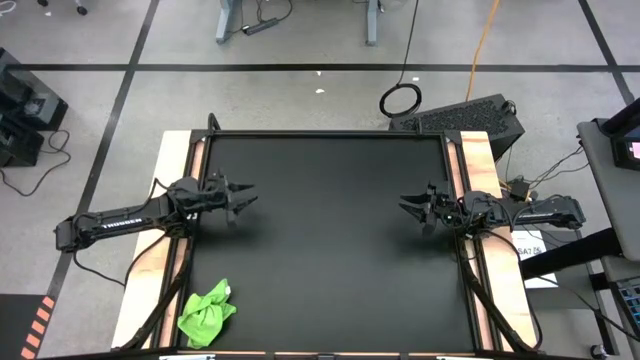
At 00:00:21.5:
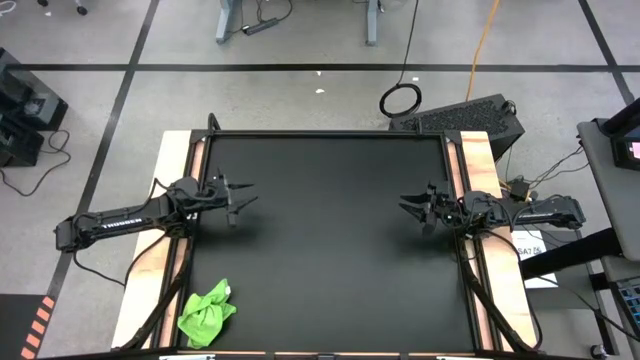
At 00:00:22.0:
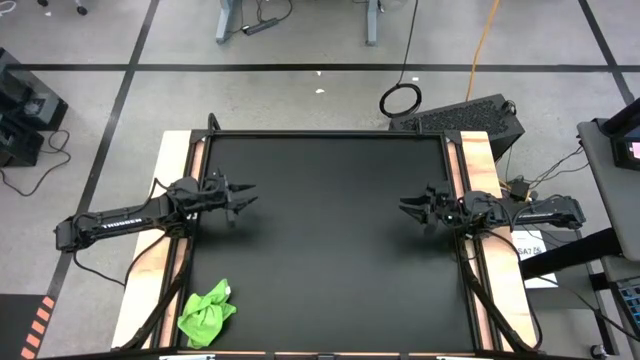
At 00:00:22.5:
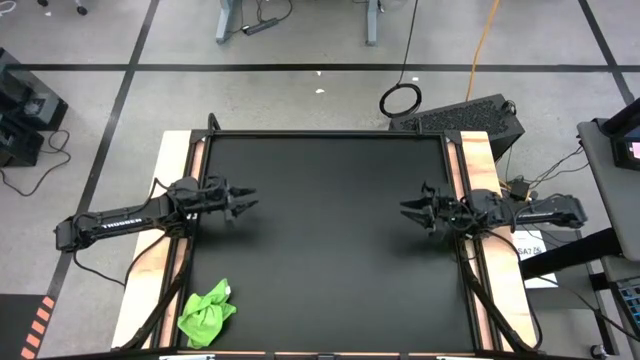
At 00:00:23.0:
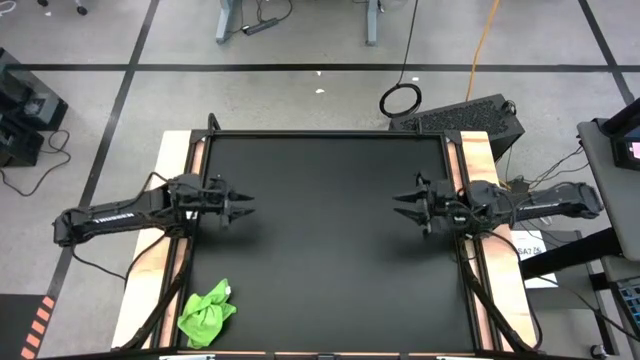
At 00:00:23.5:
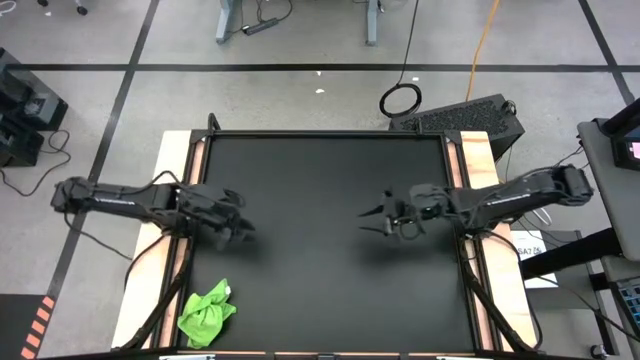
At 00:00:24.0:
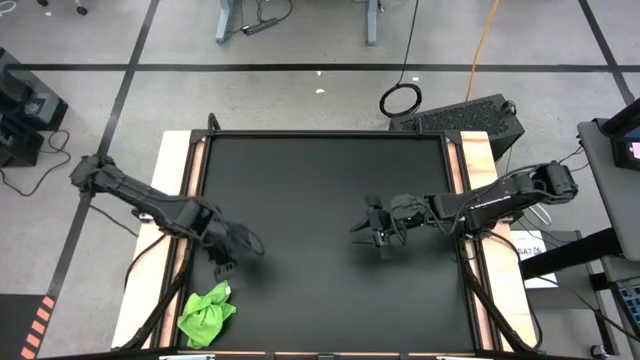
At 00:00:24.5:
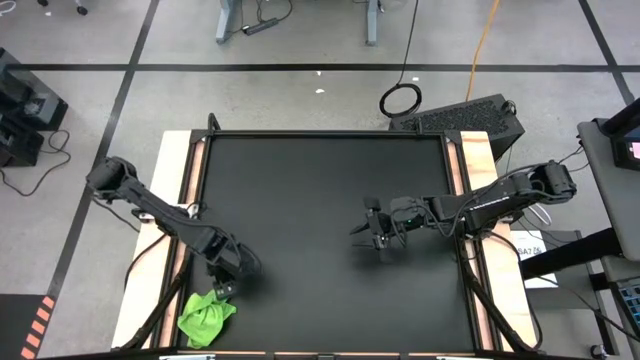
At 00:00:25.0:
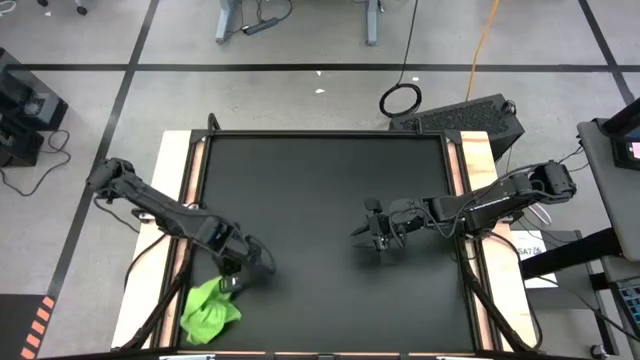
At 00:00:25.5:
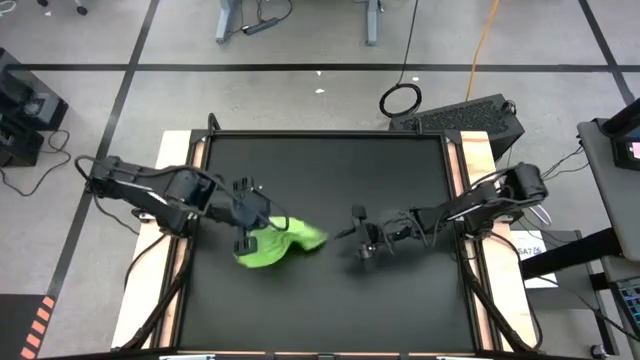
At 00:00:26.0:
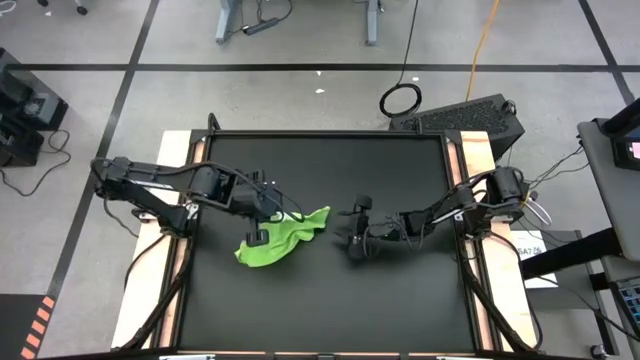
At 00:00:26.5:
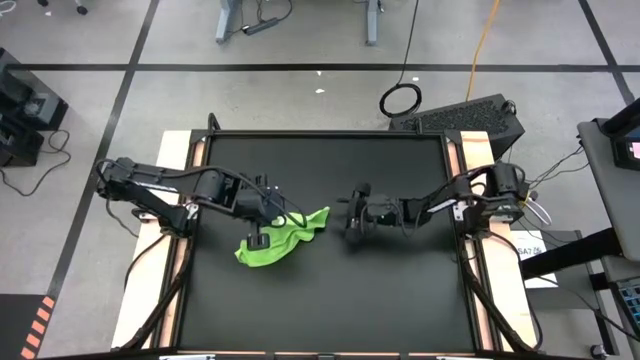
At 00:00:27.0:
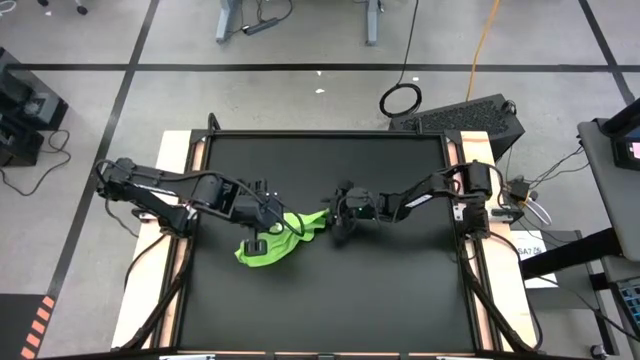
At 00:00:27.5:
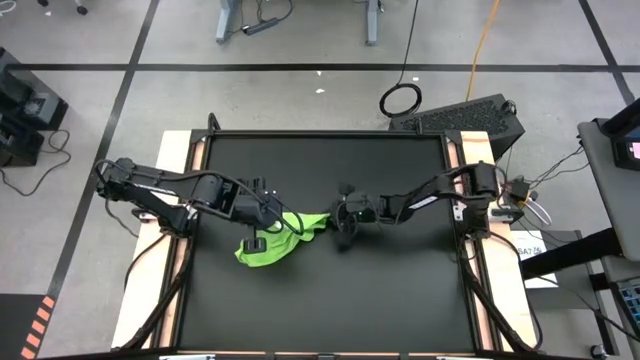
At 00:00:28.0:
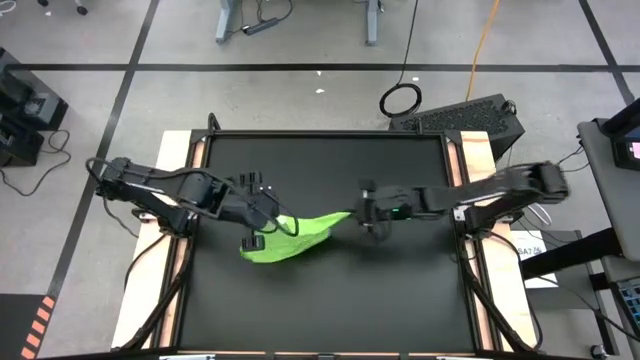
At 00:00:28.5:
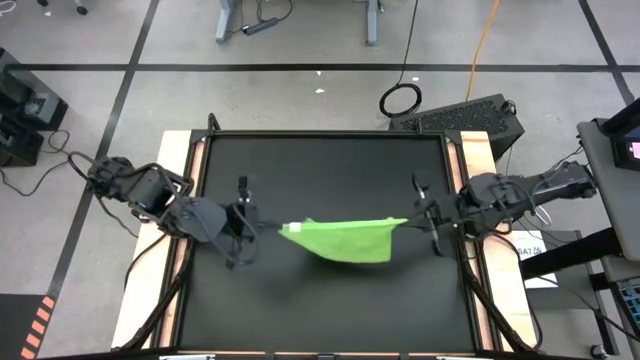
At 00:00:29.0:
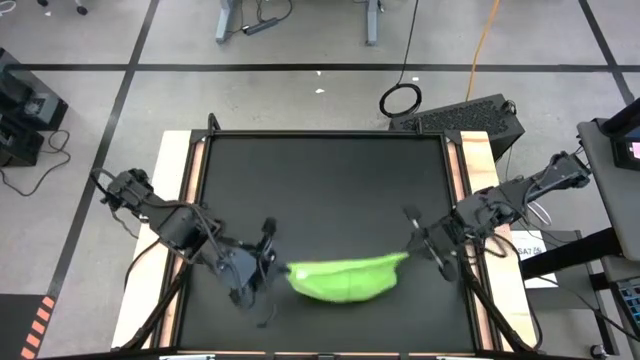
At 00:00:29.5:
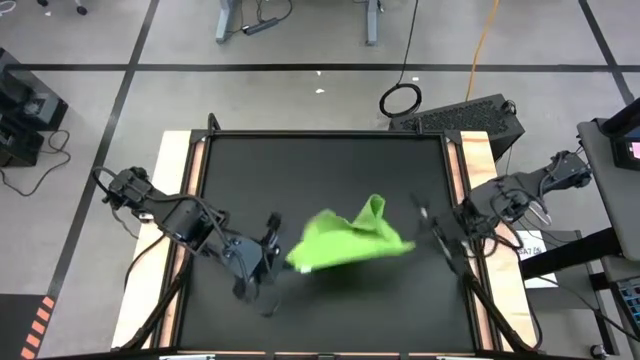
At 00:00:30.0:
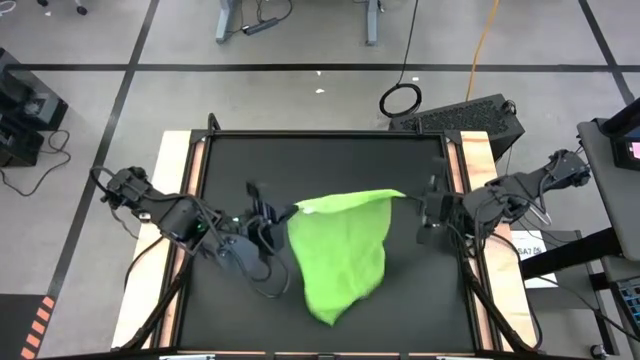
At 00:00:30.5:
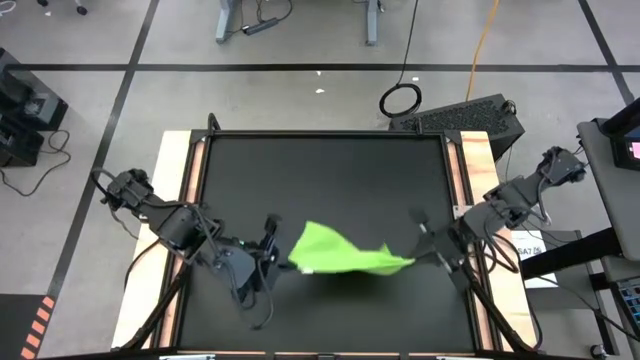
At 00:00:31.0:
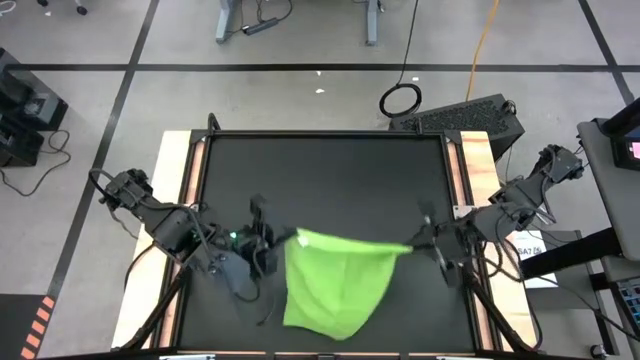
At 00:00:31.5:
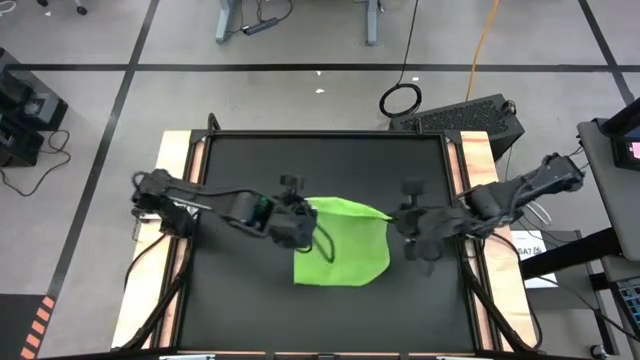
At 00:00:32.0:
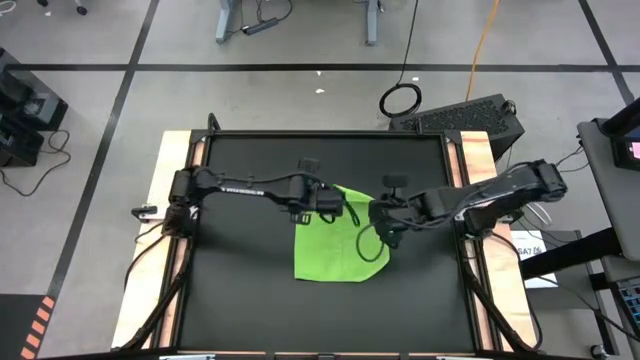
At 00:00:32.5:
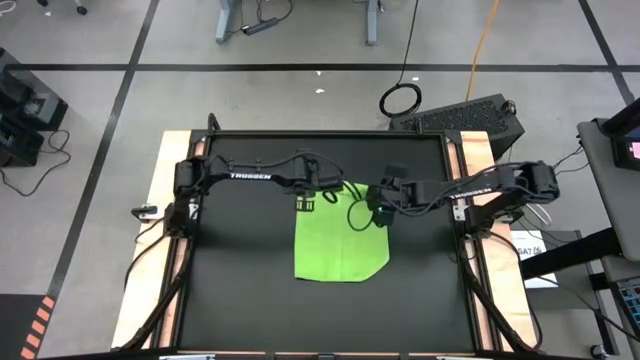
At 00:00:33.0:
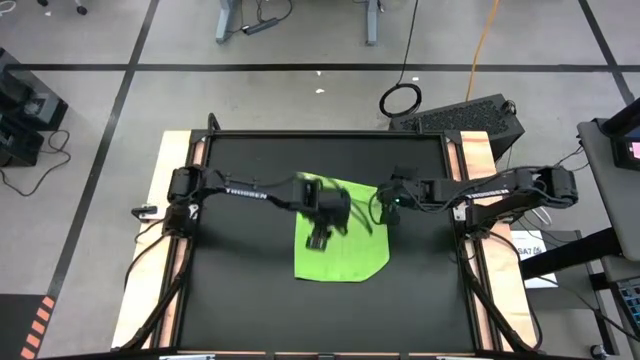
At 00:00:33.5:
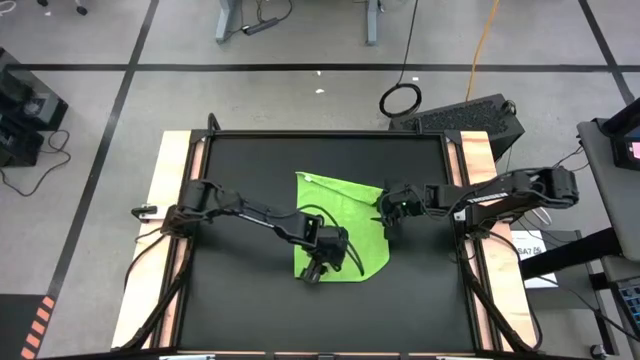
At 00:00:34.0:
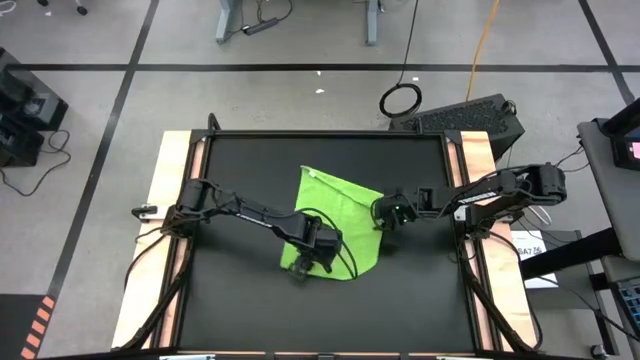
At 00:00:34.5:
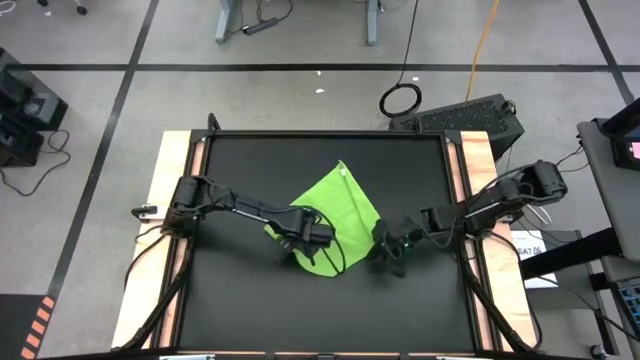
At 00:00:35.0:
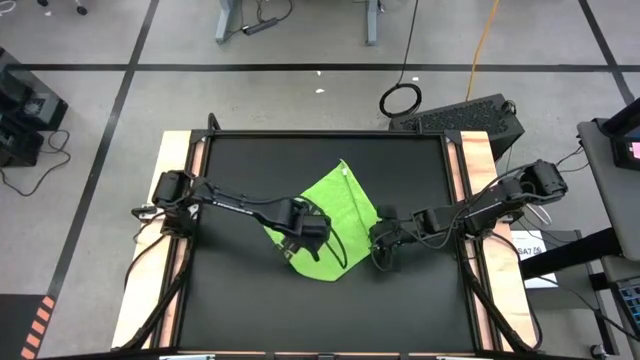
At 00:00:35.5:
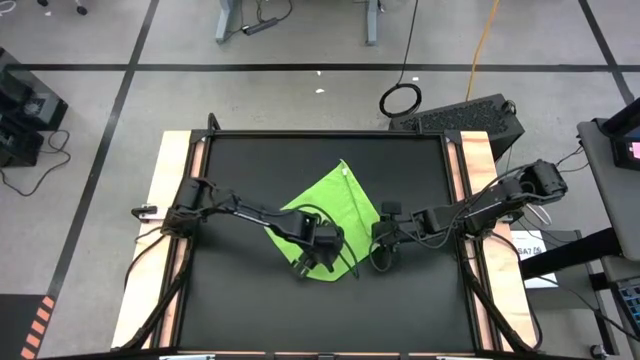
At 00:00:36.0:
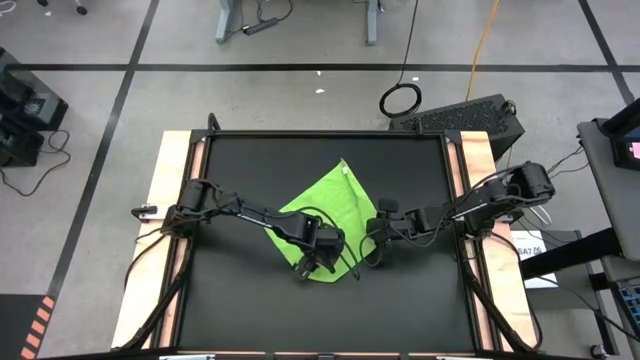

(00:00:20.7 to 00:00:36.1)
Task: Roll towel
Fold green microfiber towel

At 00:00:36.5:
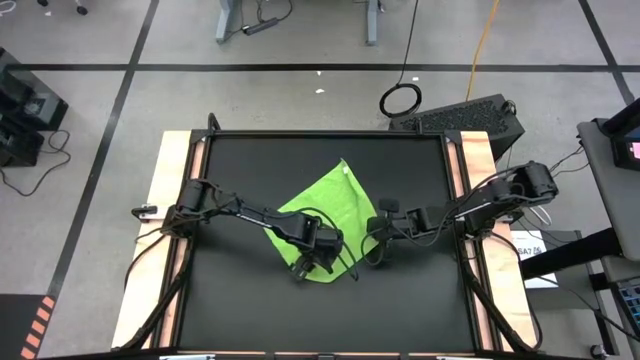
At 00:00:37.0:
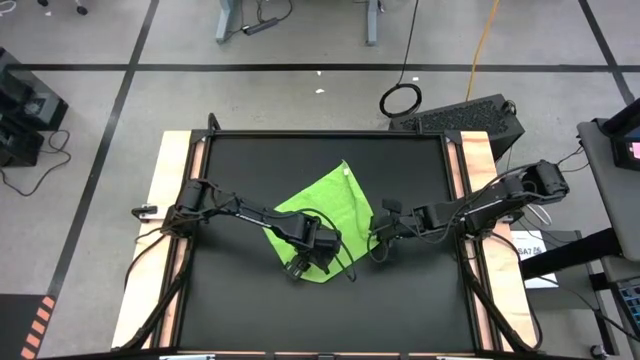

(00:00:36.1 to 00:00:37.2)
Fold green microfiber towel

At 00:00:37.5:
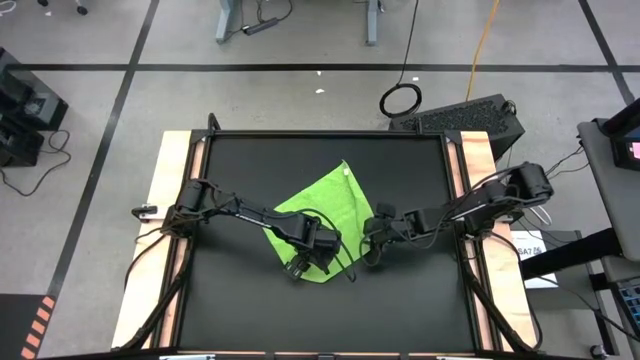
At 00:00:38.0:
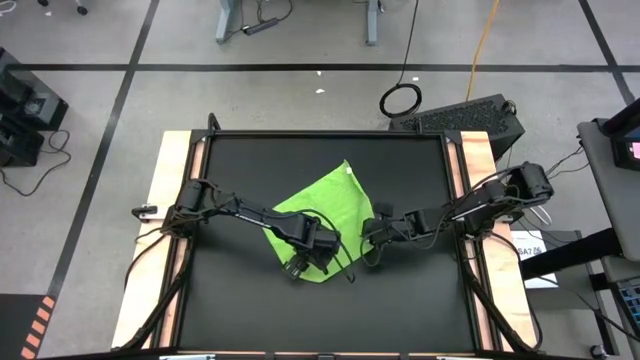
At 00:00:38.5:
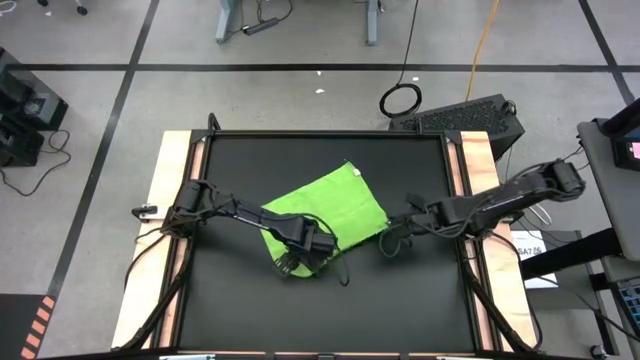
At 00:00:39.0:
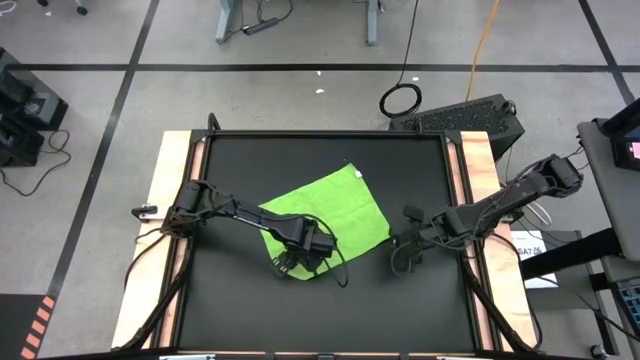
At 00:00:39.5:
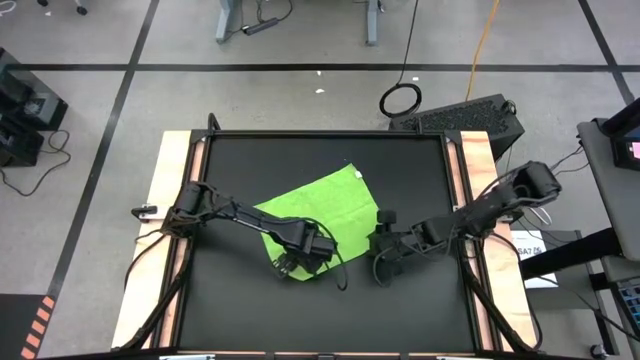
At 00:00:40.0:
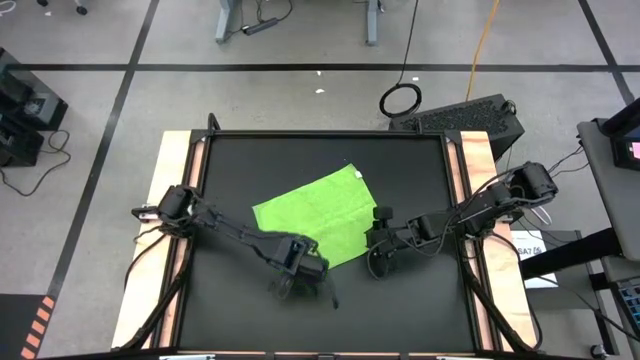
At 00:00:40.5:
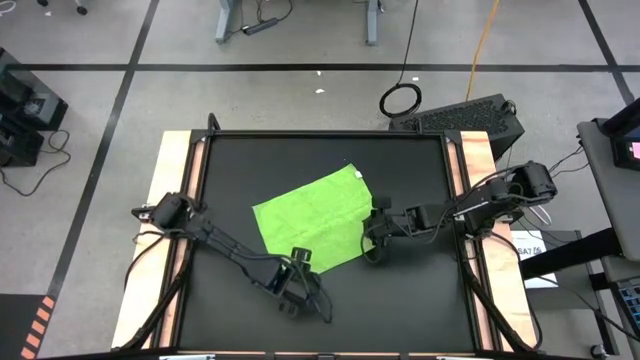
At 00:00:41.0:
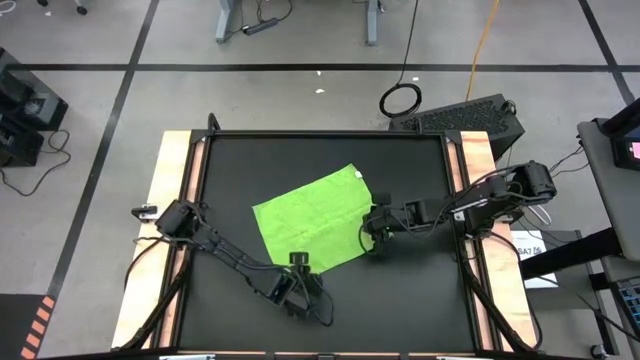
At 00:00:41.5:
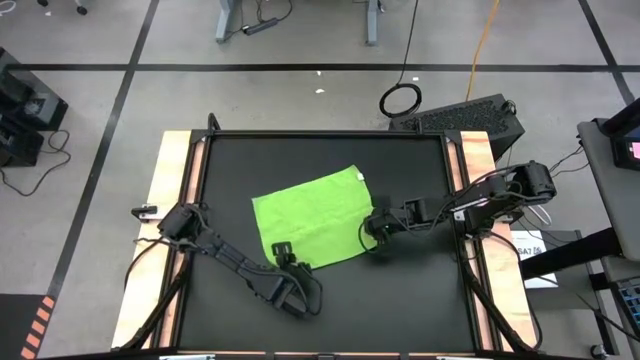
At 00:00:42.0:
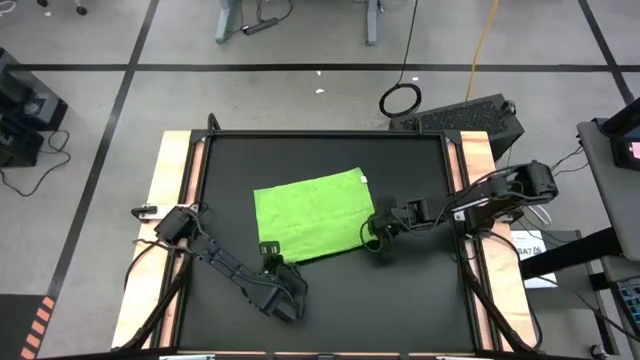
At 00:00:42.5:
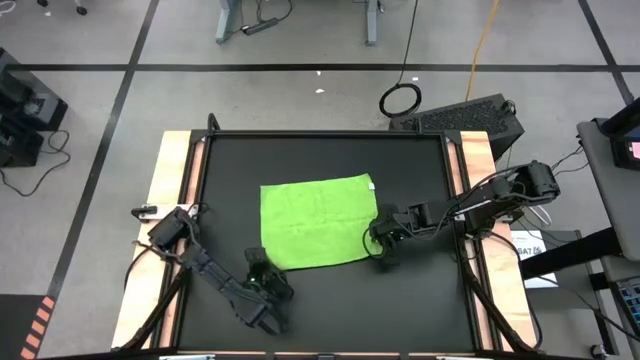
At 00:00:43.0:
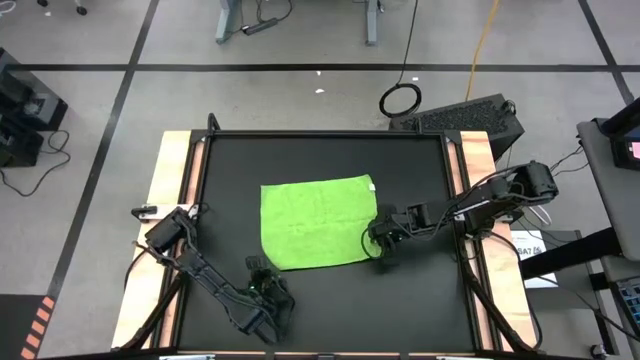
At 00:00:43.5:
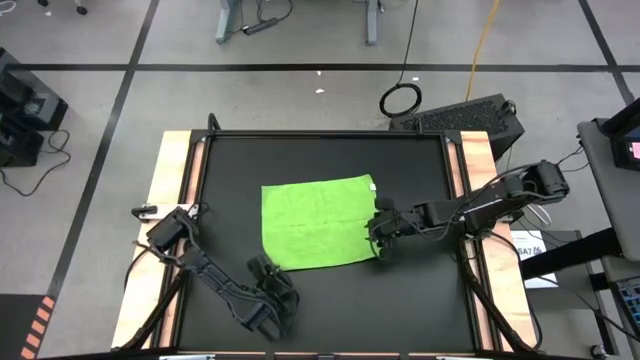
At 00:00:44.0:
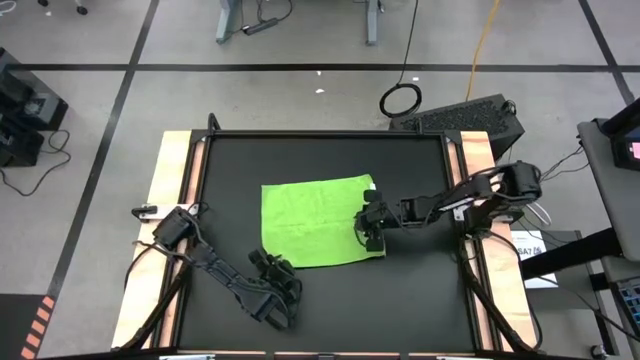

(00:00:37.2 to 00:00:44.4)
Fold green microfiber towel
